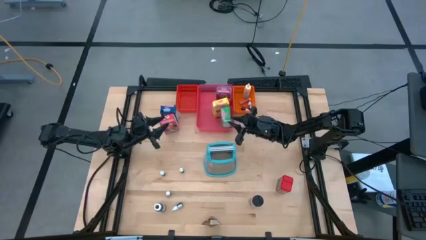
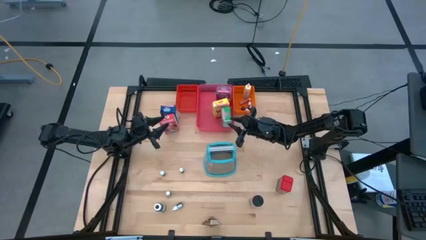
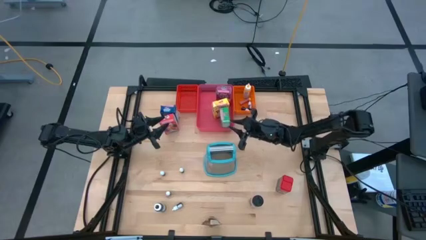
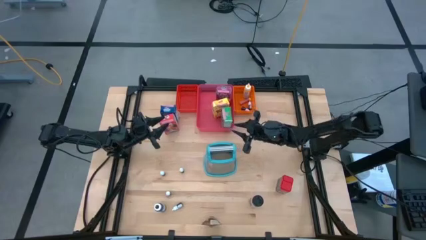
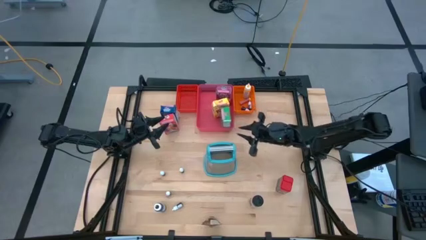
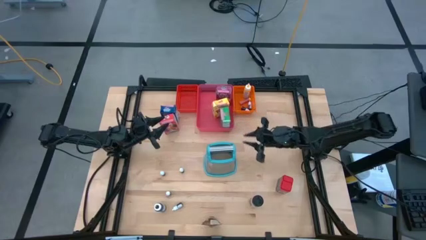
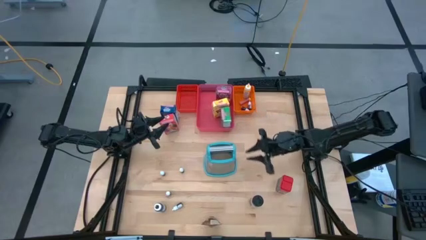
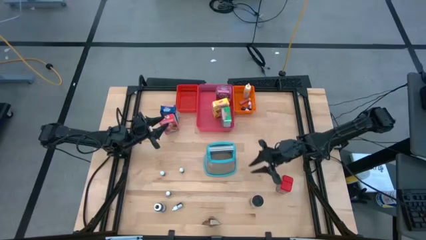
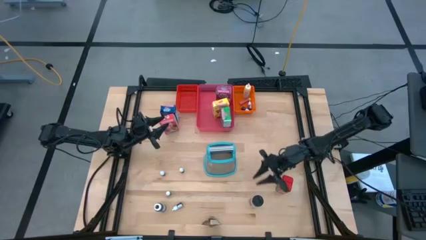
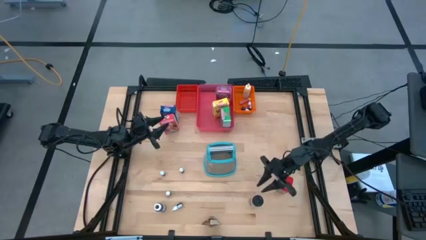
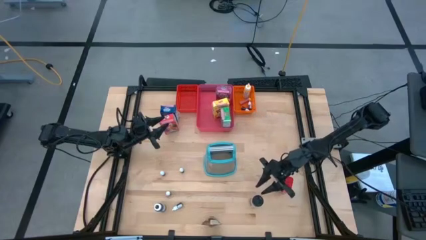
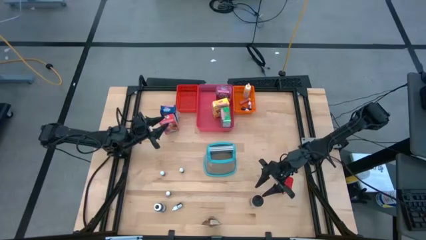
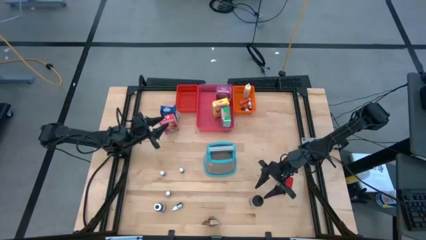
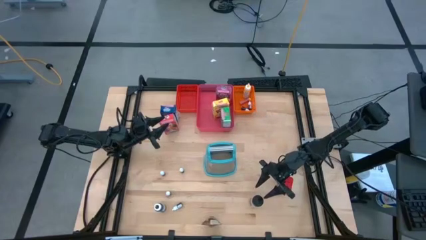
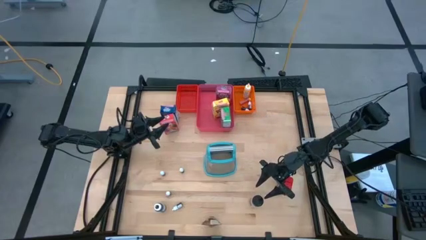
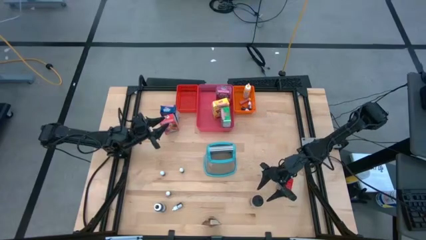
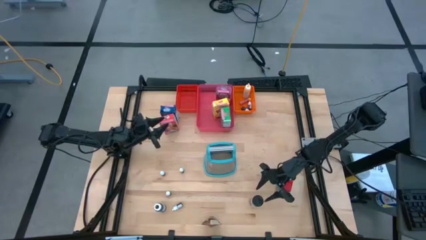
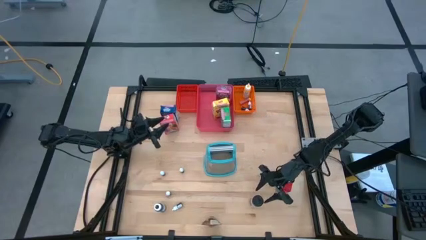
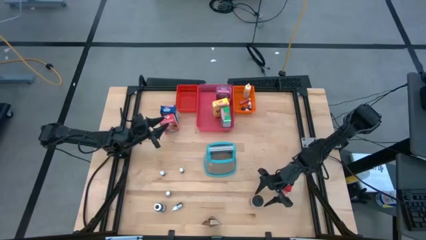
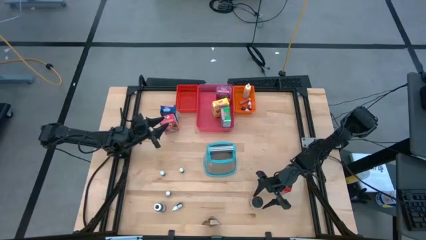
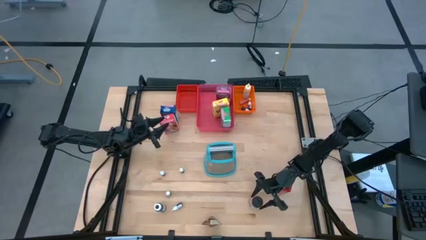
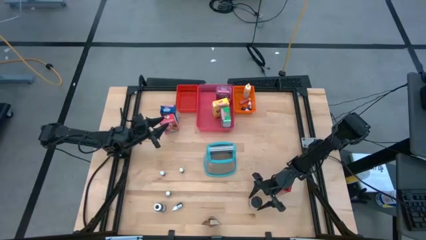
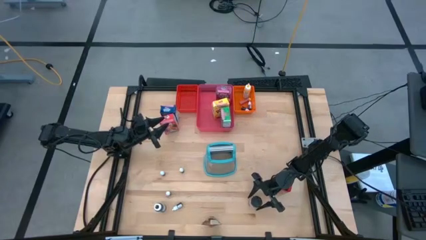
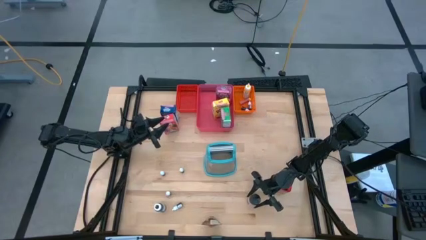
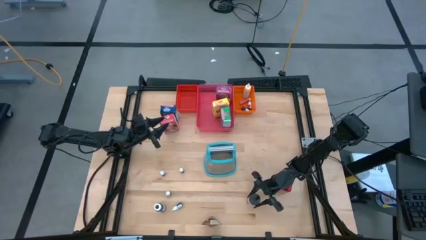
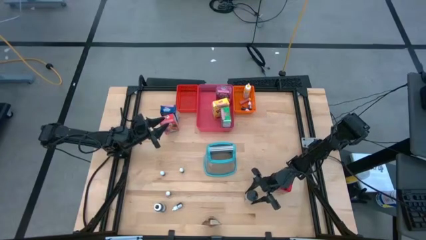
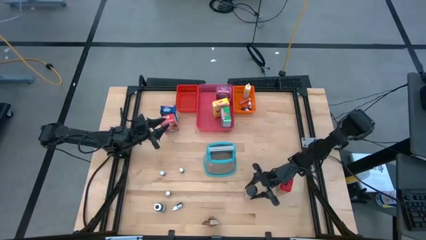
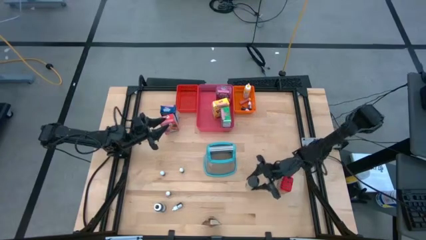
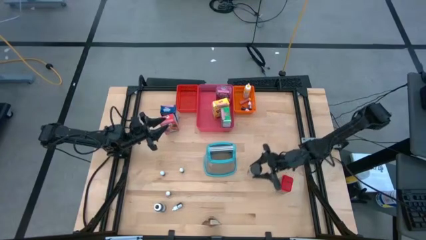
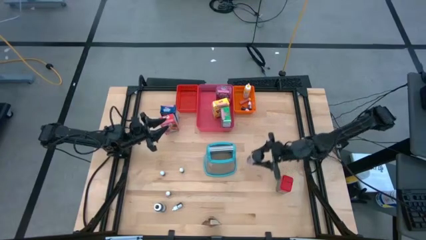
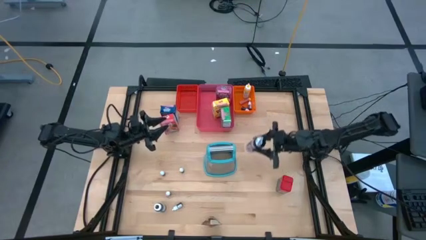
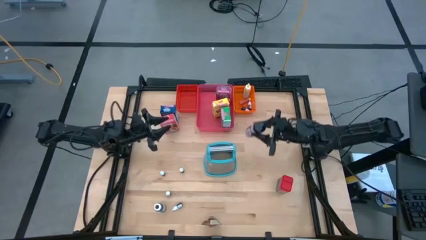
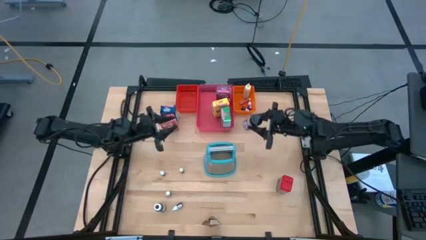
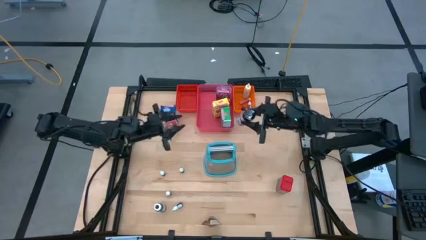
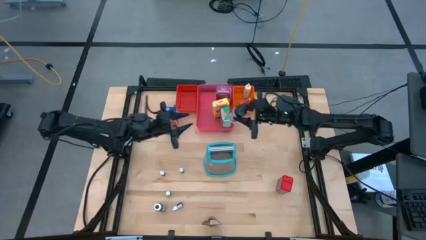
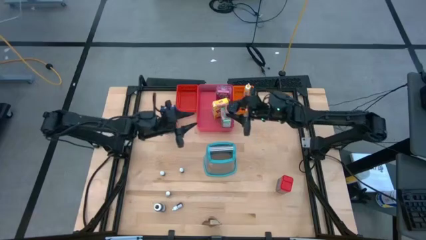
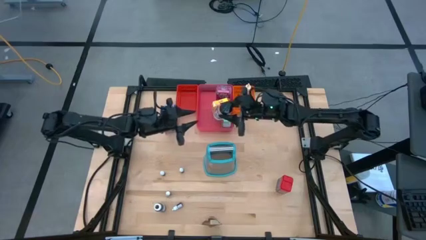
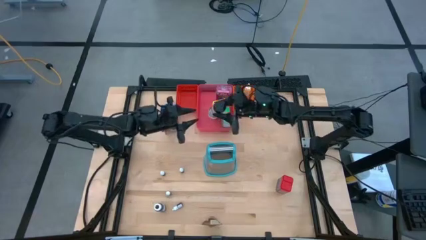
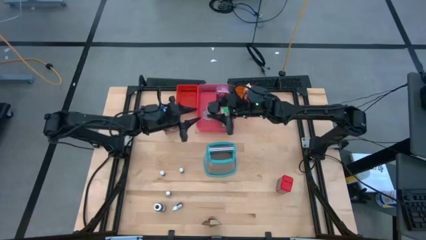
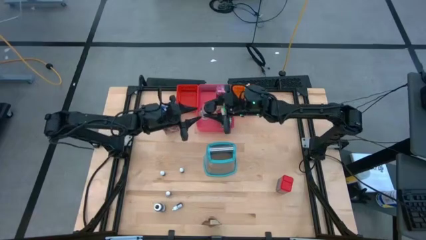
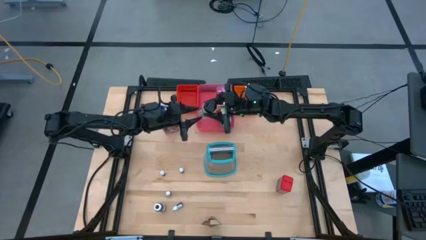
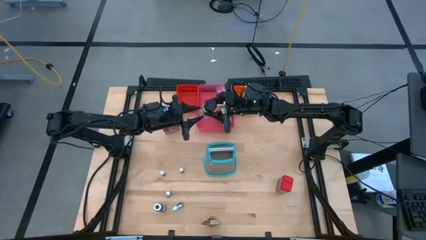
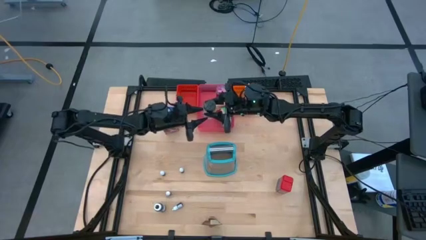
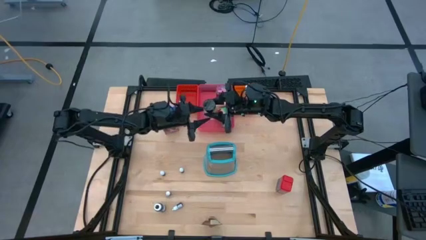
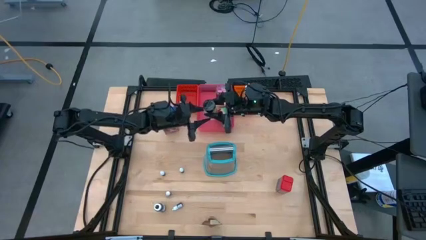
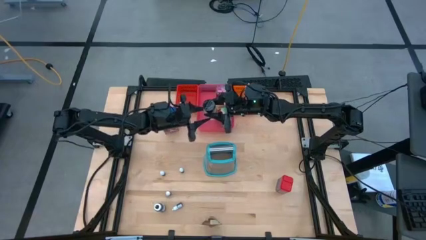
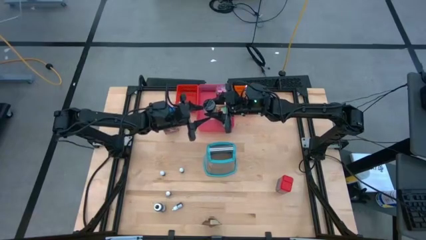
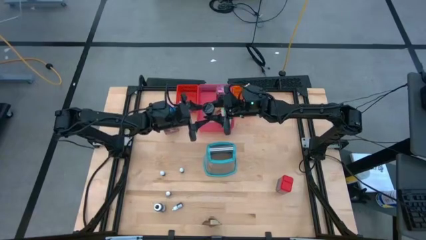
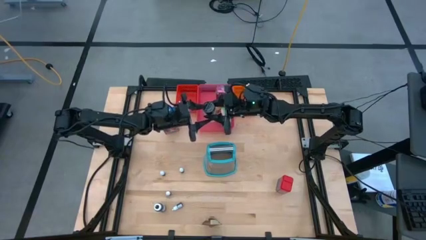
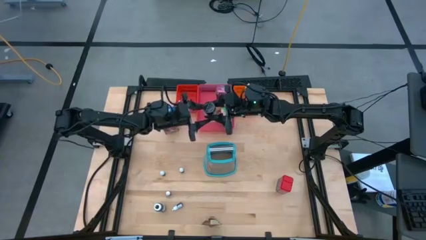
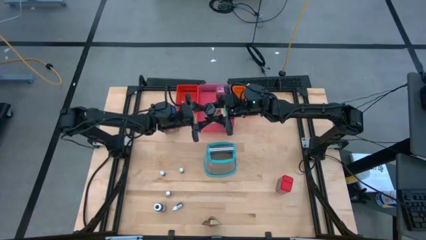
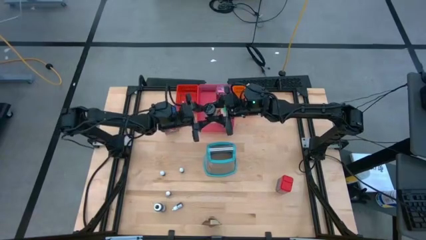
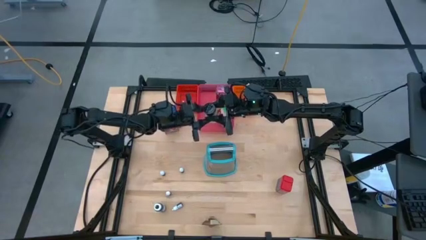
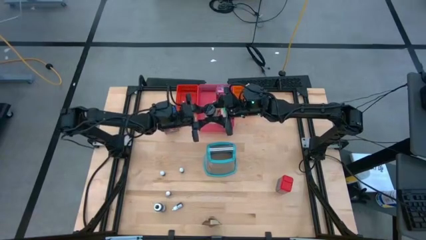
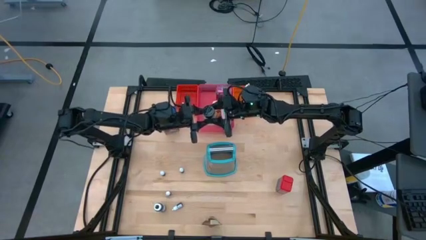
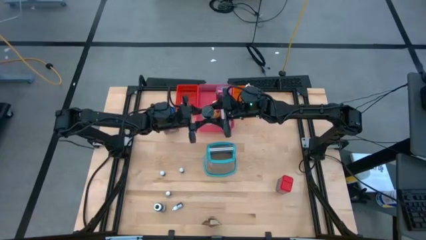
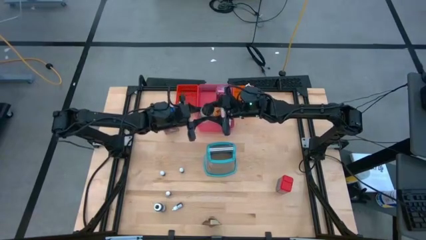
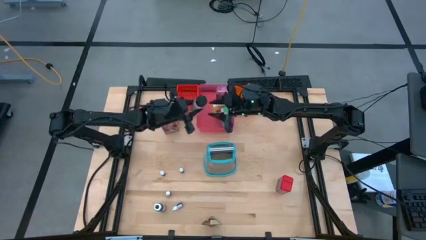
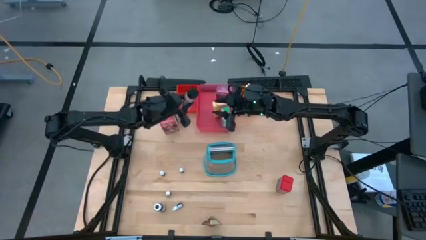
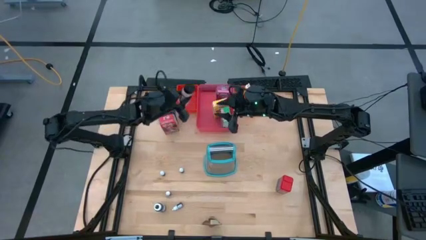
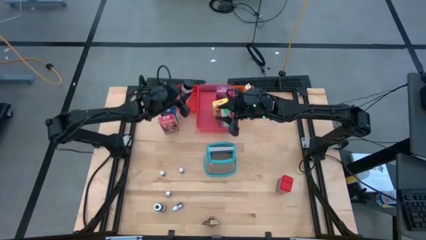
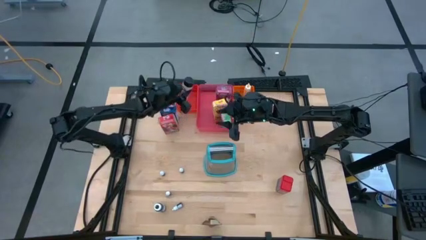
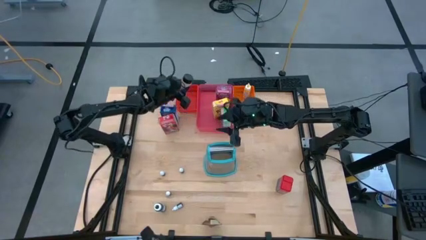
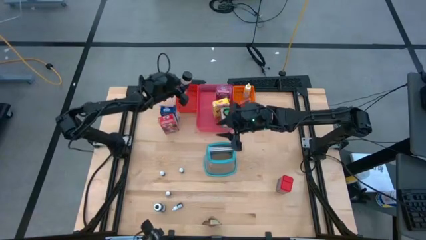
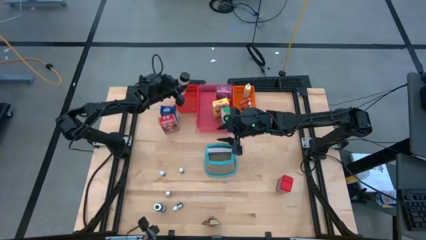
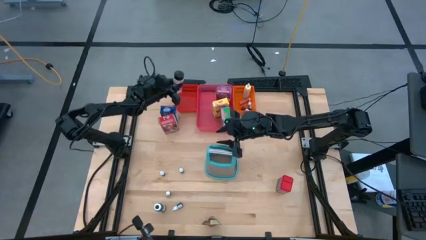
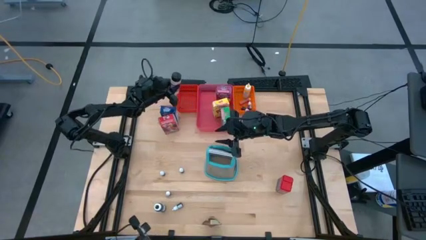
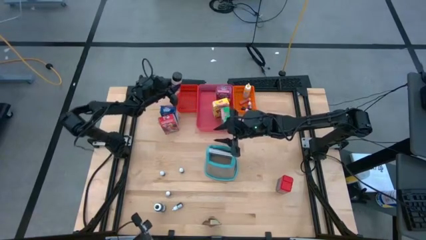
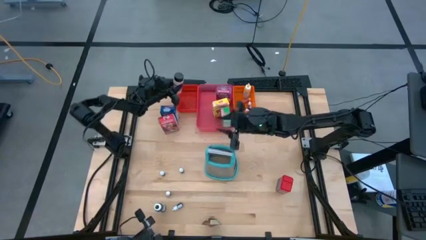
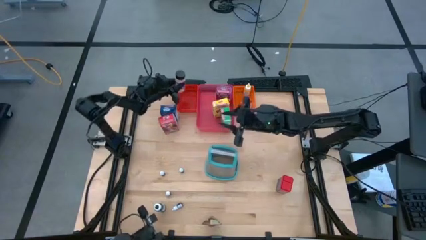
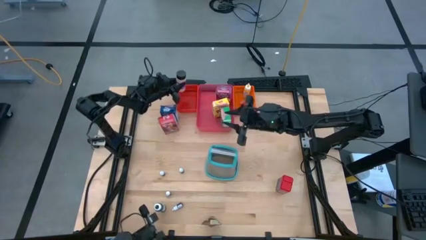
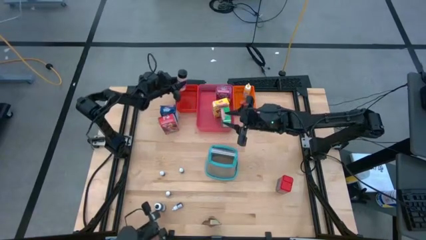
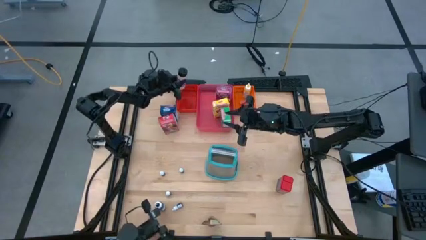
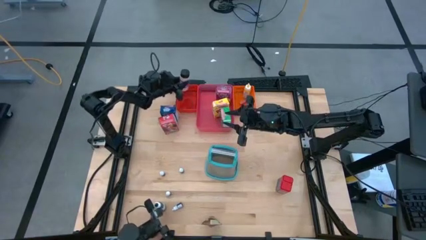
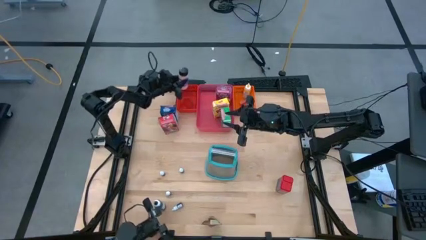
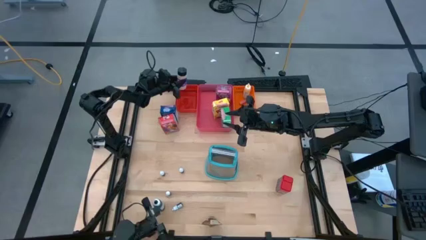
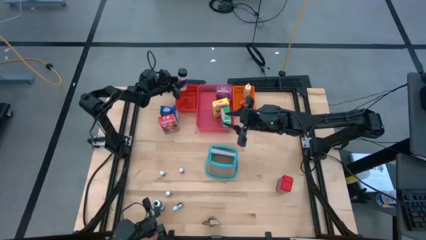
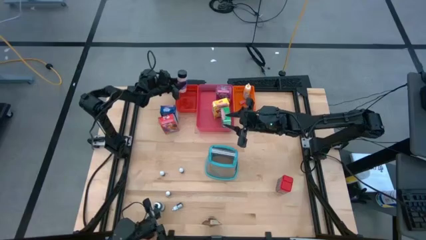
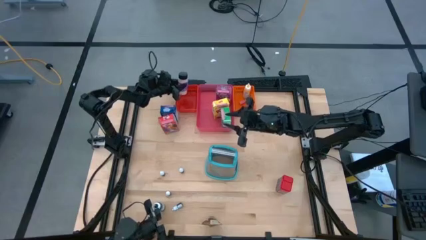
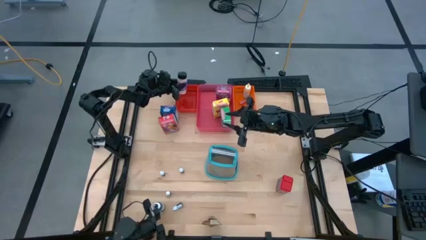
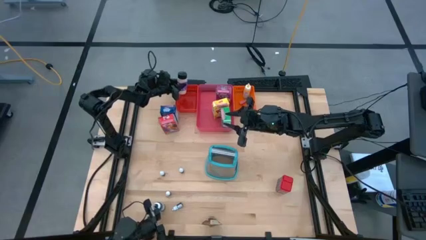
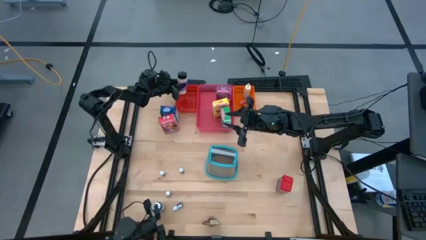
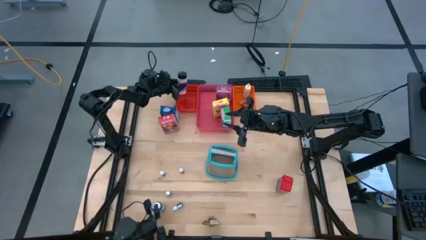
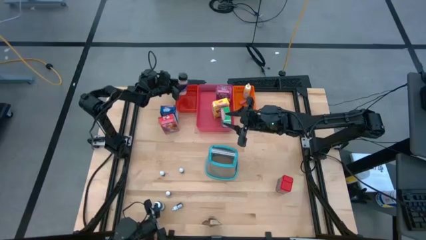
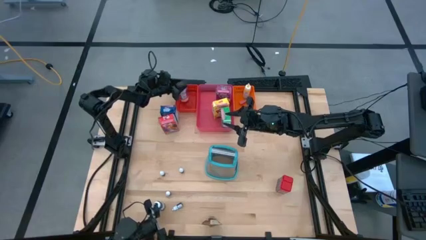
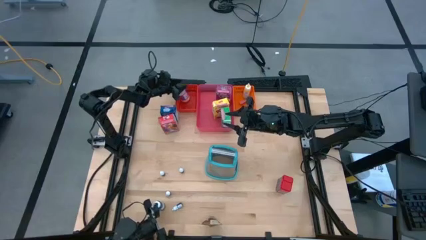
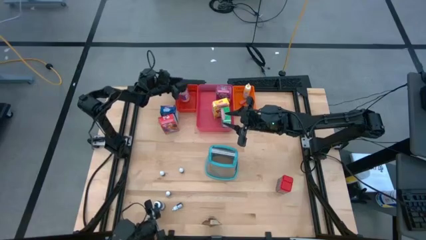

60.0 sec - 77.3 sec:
Task: Pick & Place Kitchen Items
Put the purple seasoning bottle into the red bin
